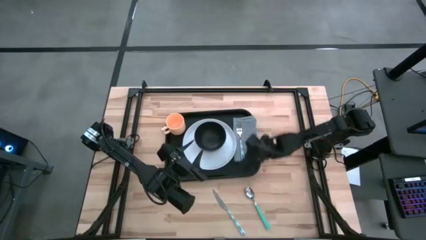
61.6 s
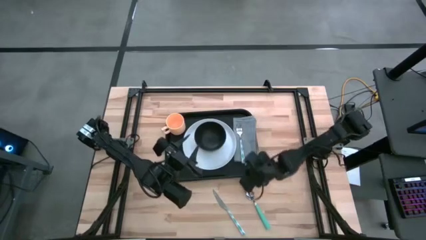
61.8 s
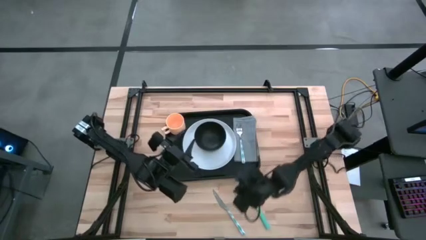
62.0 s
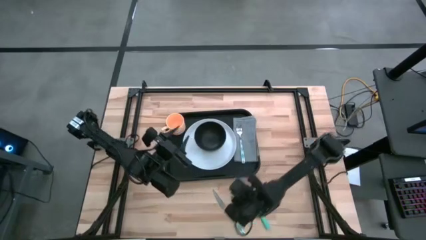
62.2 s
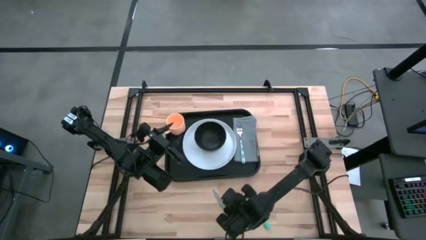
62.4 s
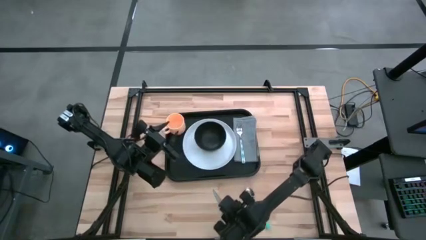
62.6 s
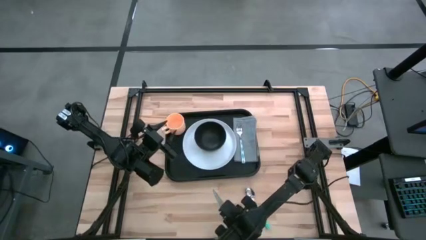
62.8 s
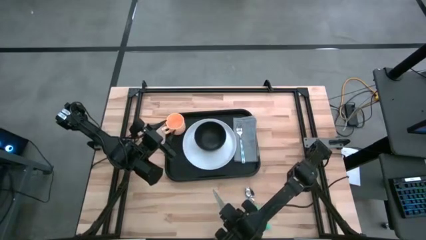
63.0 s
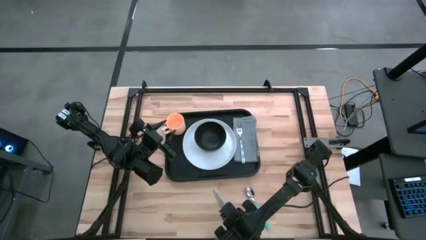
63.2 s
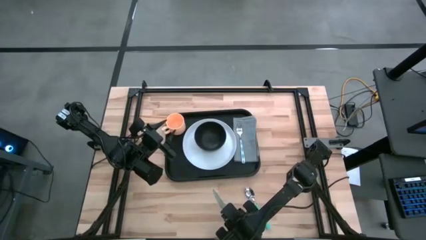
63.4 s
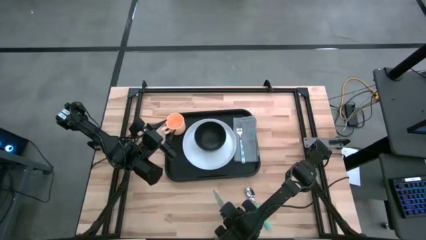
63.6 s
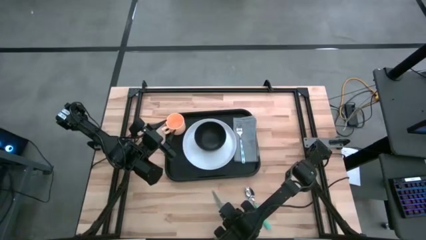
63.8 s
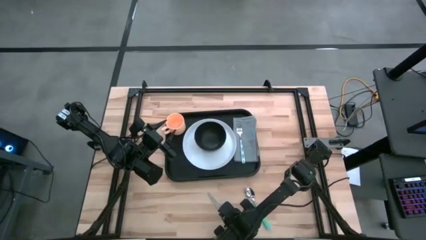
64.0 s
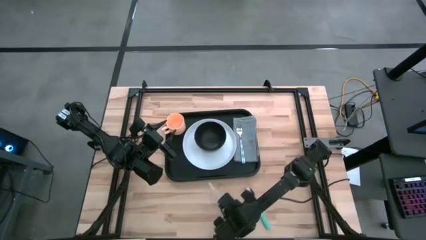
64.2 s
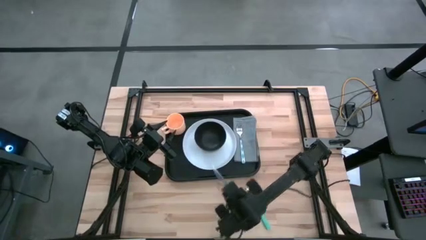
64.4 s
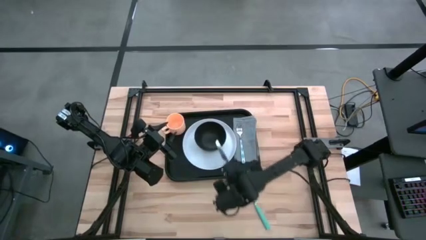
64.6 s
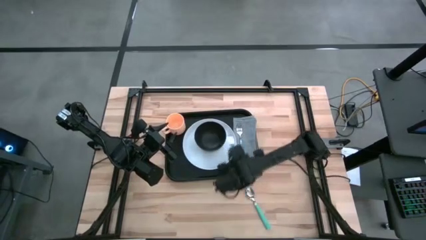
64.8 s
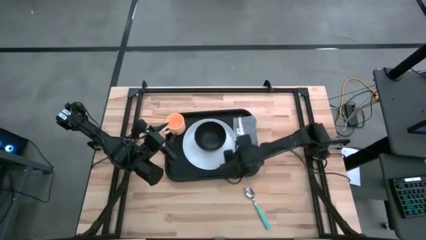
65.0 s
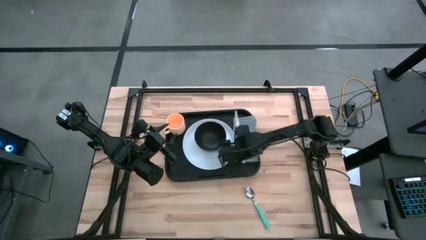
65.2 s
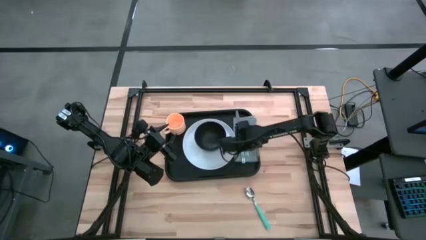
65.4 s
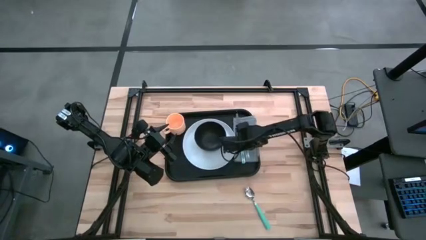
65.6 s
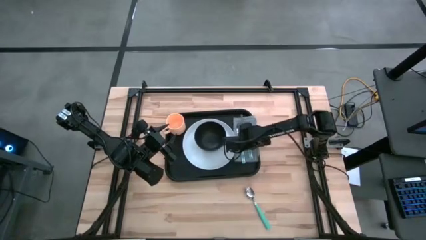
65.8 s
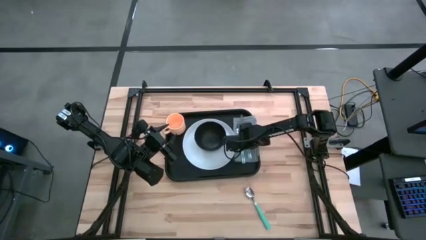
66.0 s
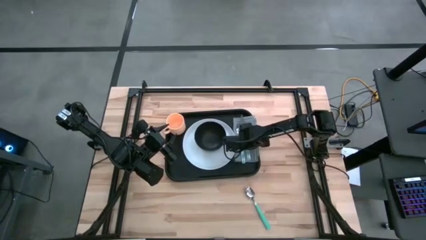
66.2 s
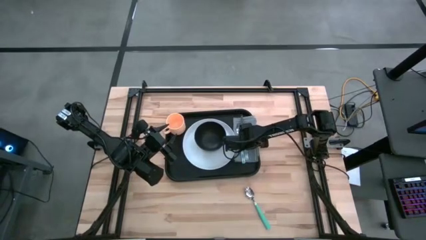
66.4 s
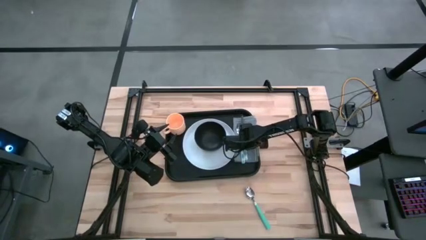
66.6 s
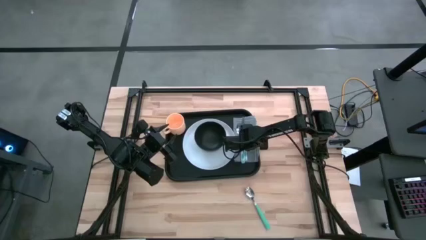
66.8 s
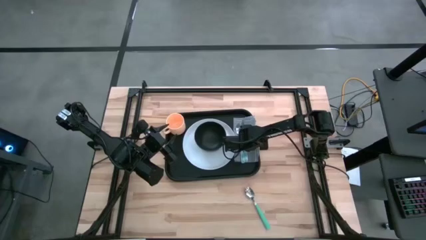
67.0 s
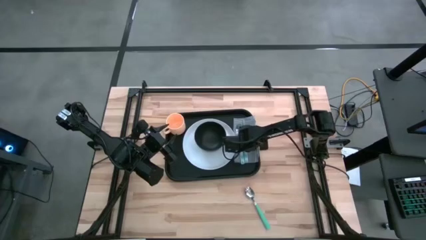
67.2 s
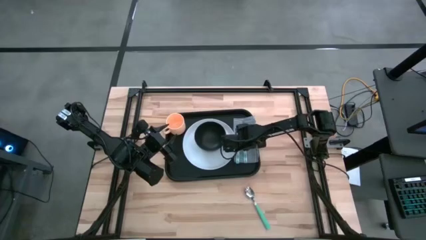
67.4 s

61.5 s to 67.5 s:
Task: Set up tray
Put the green knife on the gray napkin to the right of the green fork

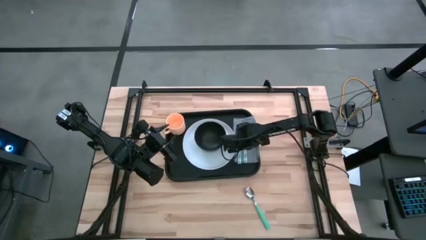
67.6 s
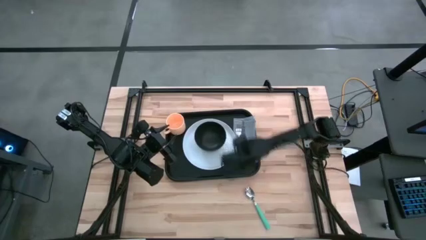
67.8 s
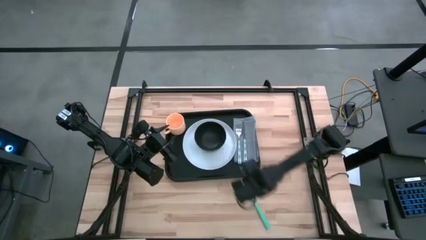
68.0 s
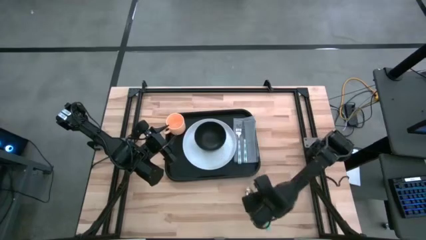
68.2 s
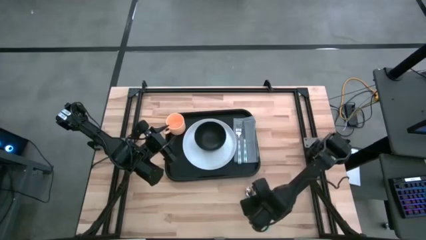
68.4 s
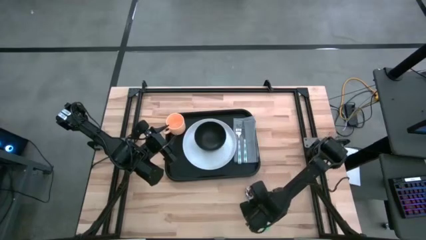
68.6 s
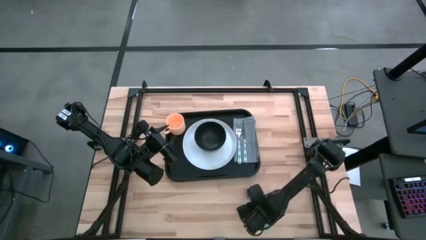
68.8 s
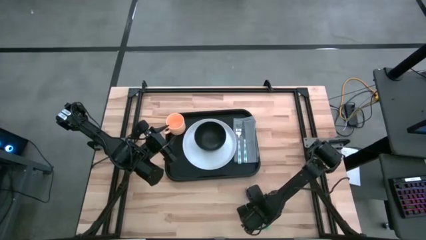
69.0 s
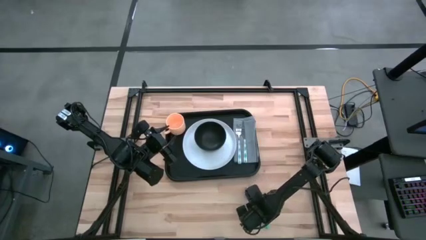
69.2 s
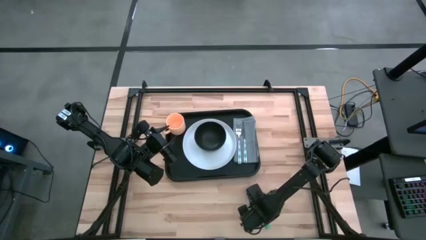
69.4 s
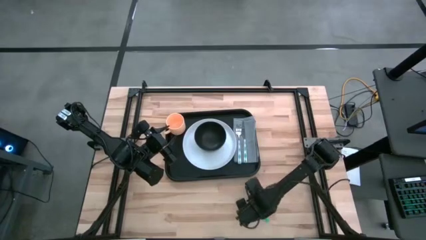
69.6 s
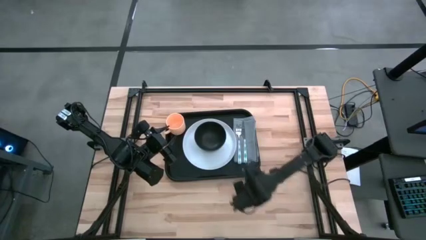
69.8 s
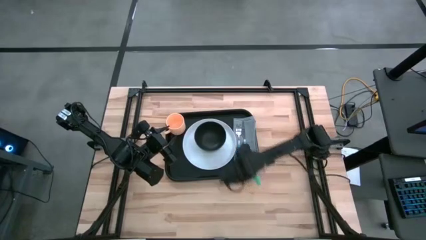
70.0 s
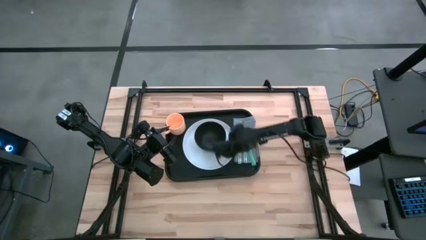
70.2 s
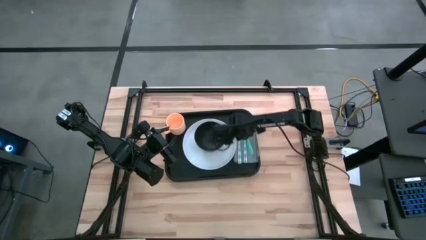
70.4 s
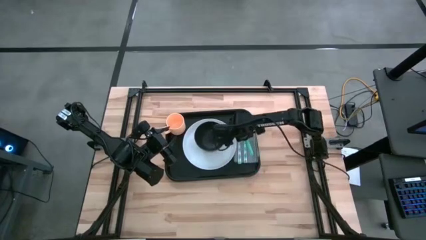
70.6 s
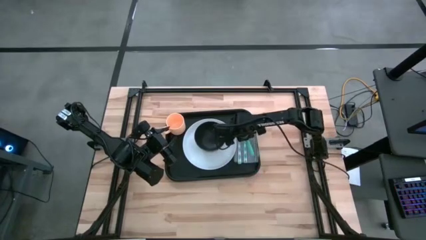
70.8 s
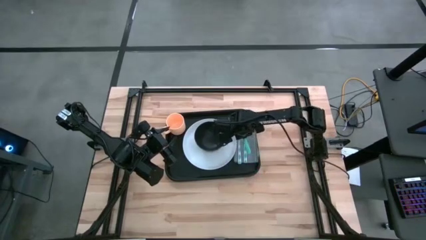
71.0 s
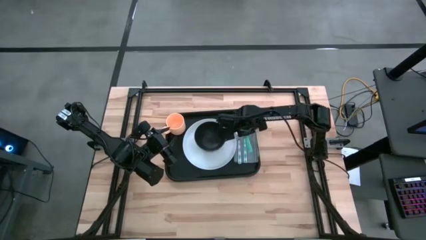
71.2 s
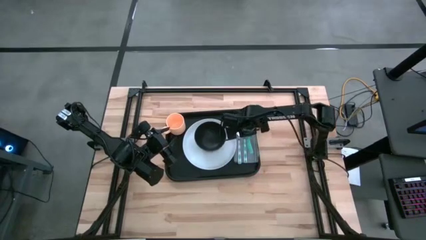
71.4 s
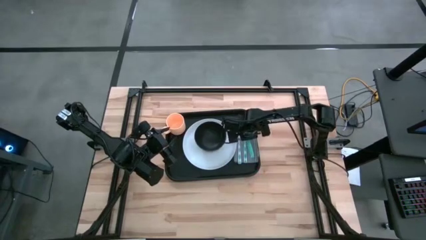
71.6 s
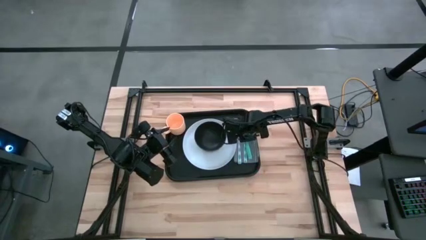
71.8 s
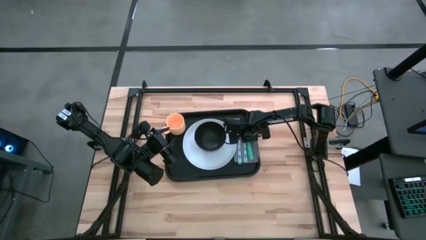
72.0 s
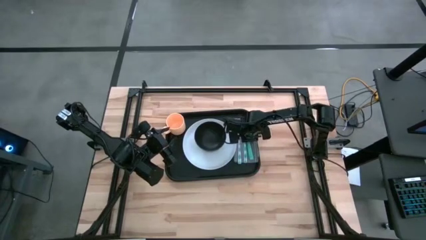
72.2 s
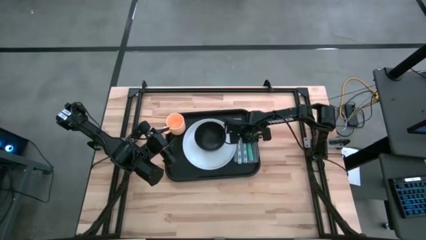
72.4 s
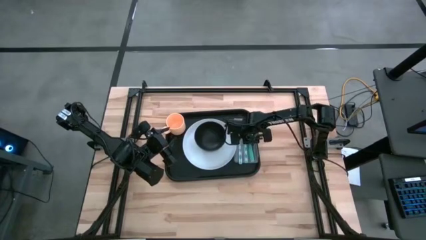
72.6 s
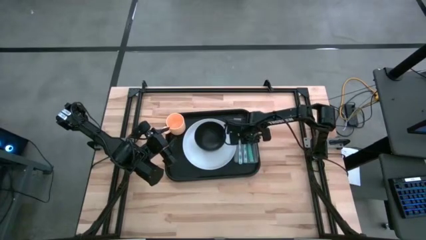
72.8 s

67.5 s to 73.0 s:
Put the green spoon on the gray napkin to the right of the green knife

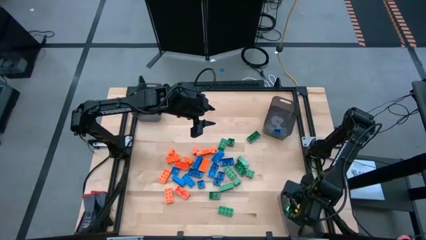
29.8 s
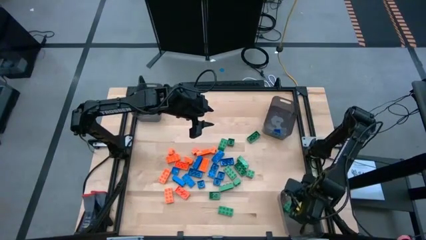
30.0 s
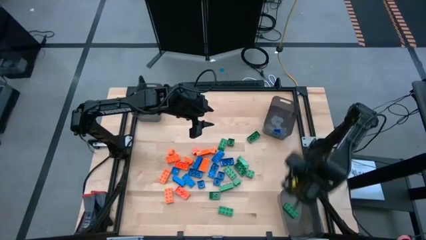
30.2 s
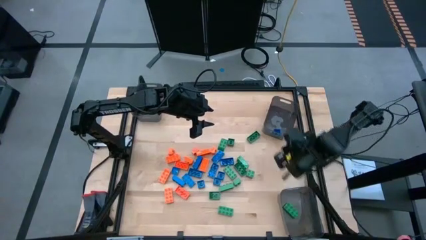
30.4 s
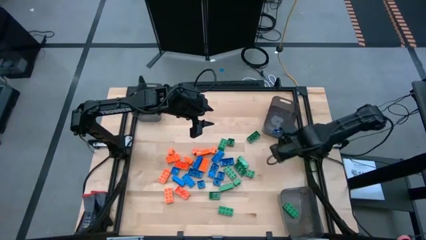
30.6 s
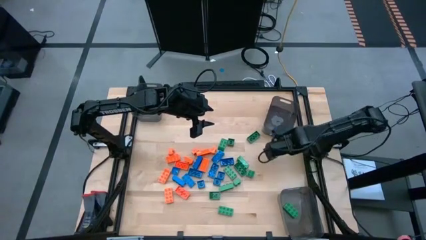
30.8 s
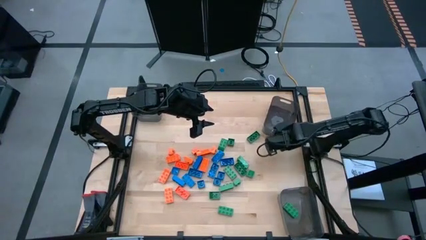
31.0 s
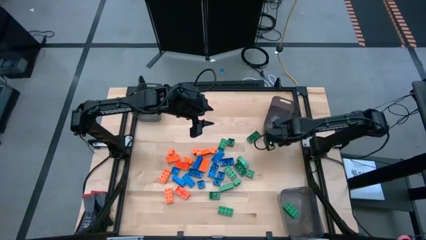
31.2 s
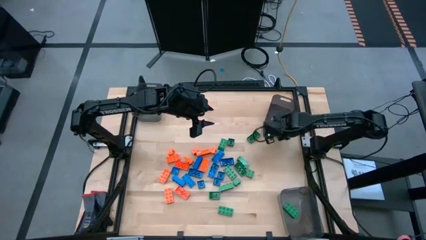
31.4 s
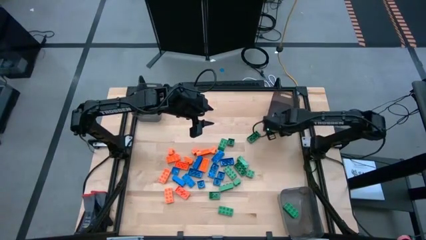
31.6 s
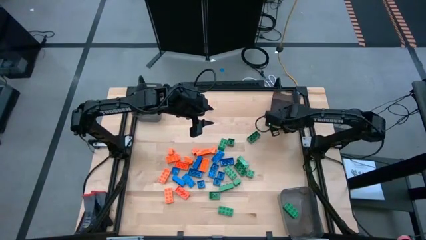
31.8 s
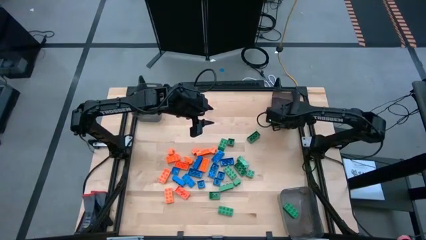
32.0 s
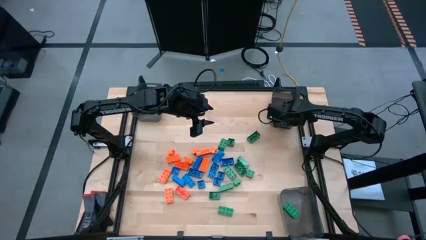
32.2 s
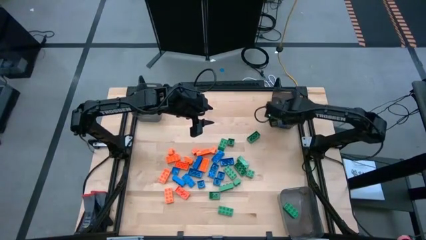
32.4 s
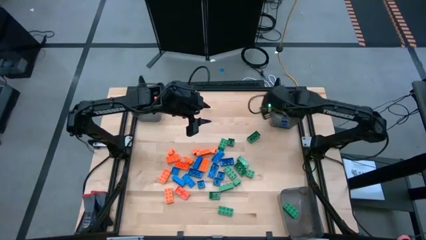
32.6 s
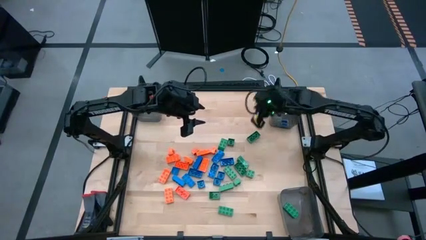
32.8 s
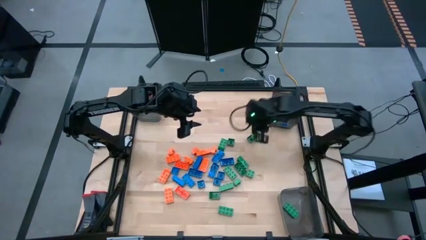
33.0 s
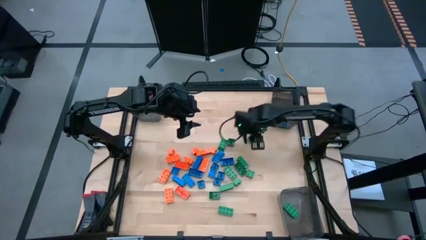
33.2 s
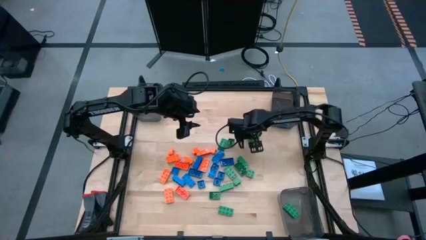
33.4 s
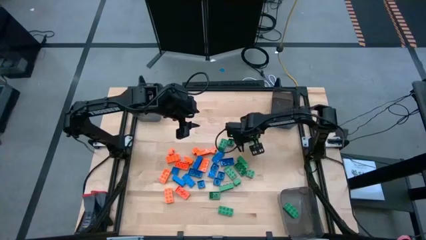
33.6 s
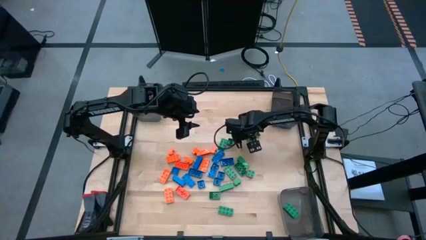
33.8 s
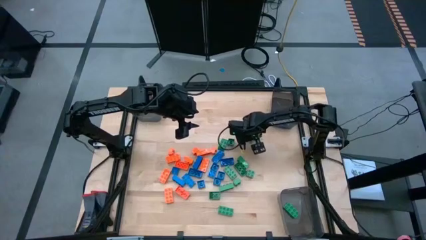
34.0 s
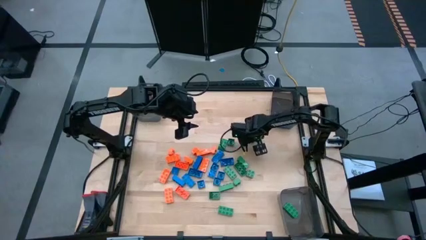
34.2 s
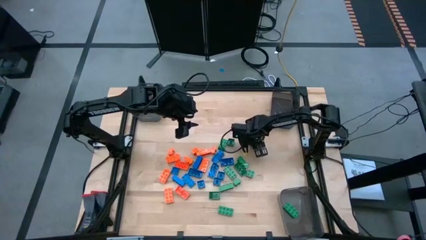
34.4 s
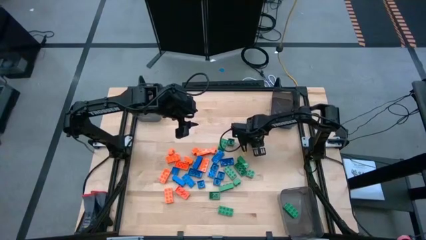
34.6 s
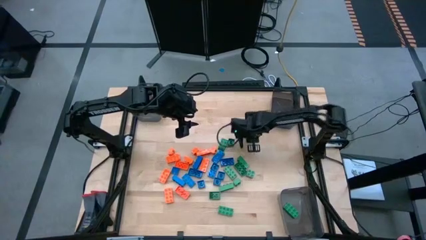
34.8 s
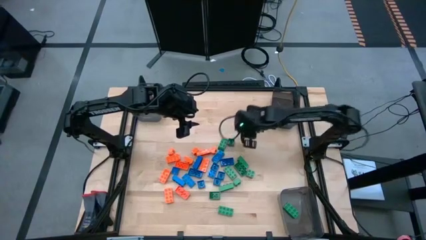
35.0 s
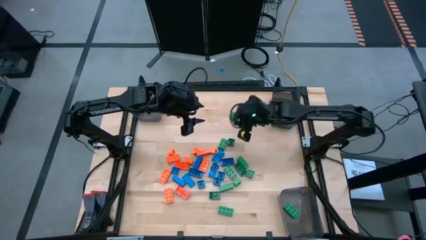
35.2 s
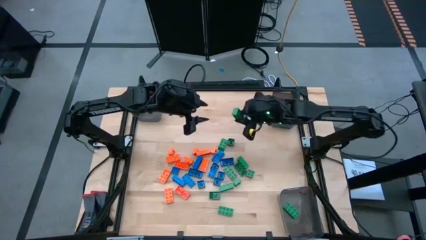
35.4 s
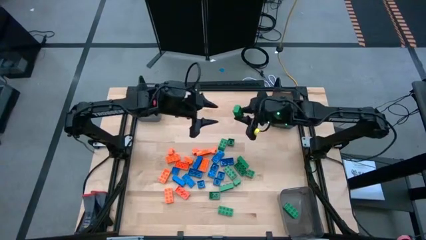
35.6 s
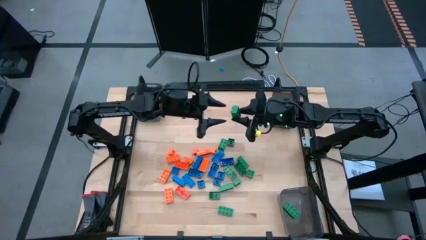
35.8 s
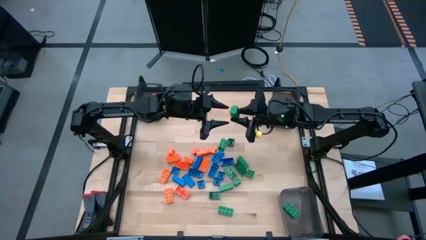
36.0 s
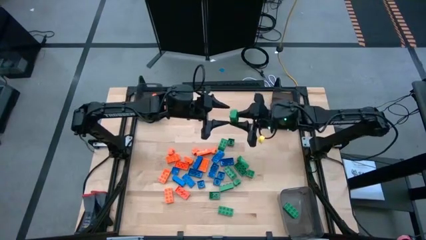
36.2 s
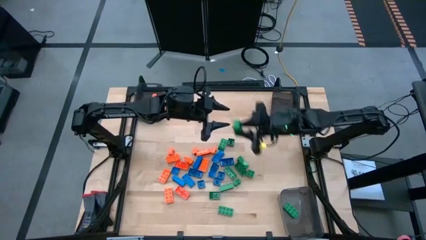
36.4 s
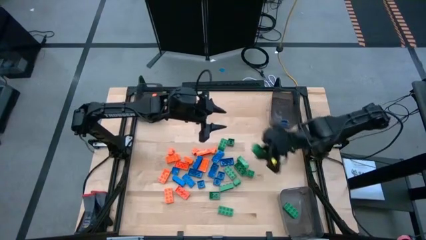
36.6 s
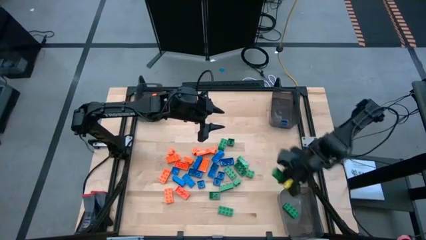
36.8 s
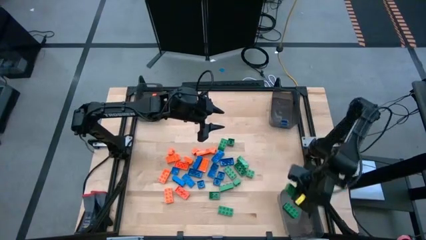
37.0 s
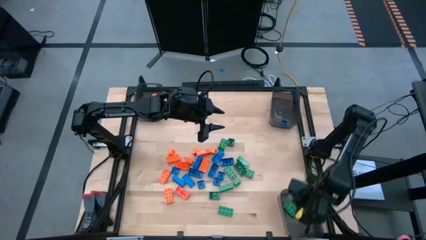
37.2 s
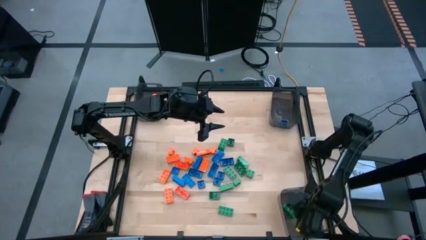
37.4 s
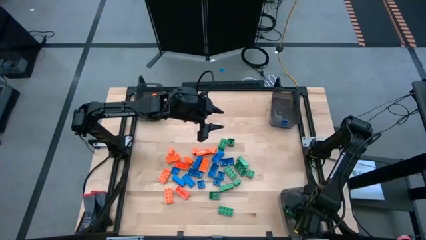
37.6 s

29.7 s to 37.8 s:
Task: Sort blocks
Put the green game piece into the bottom right black bin
